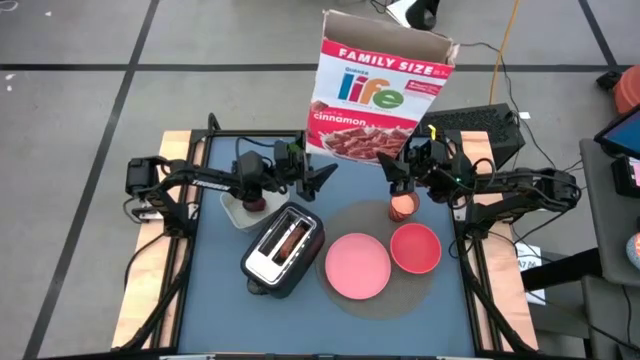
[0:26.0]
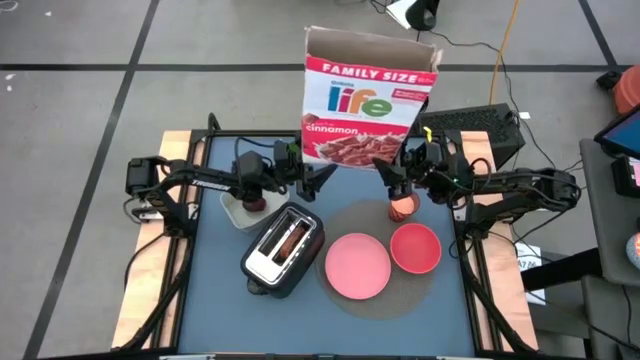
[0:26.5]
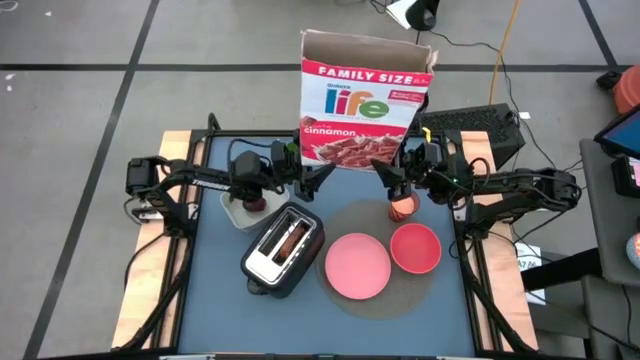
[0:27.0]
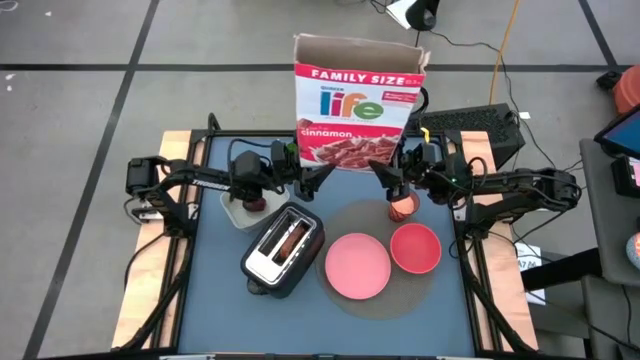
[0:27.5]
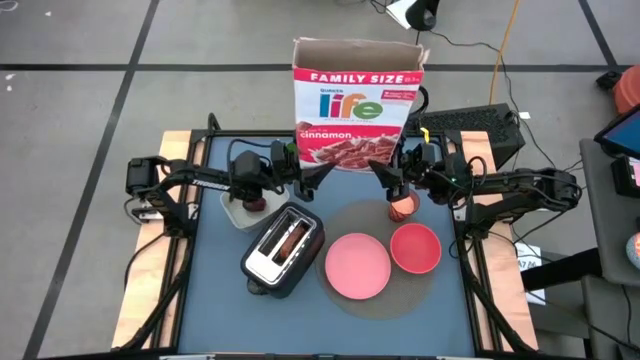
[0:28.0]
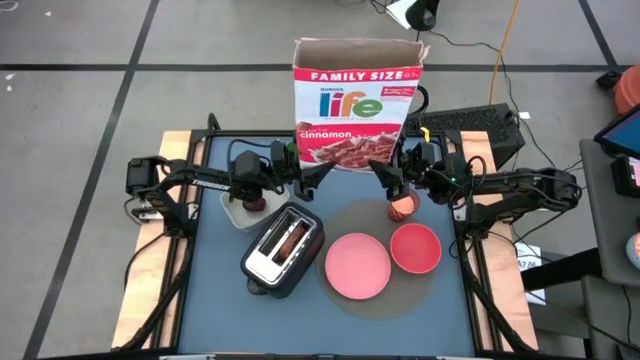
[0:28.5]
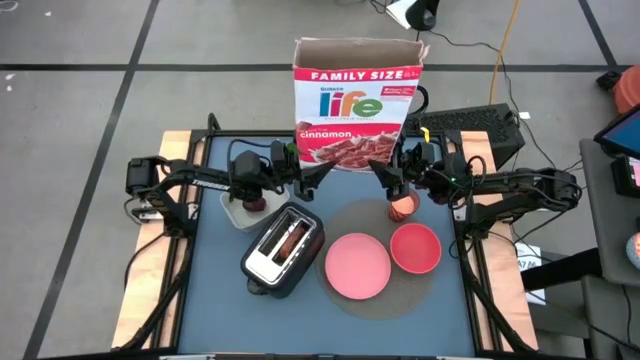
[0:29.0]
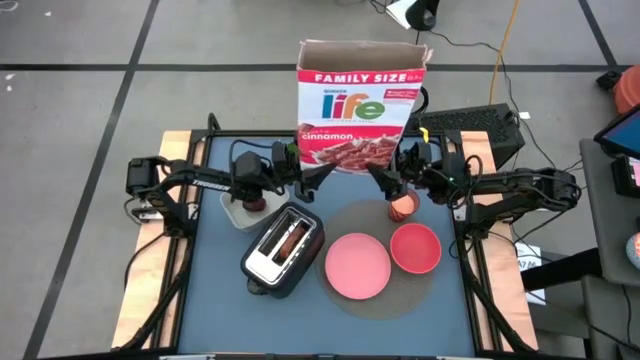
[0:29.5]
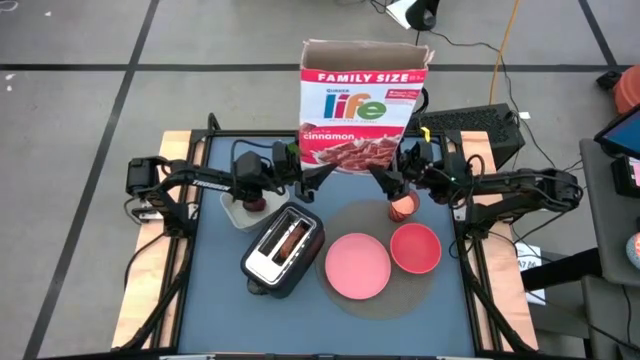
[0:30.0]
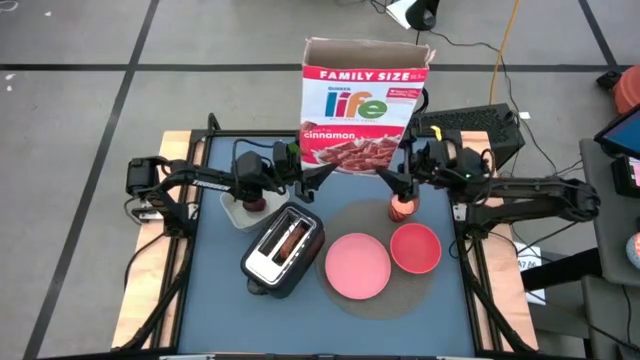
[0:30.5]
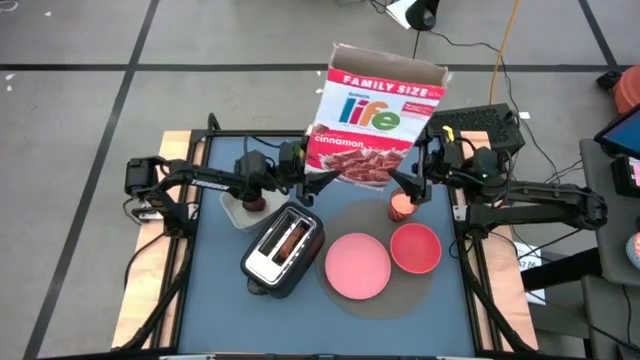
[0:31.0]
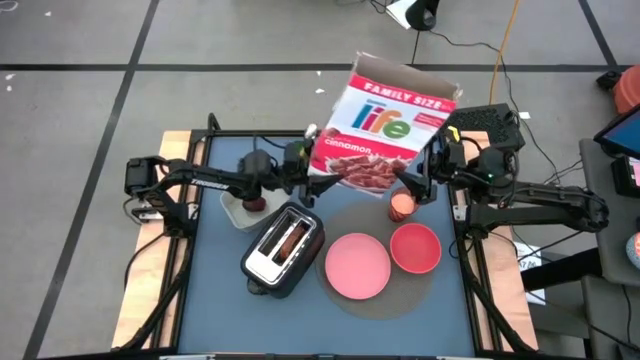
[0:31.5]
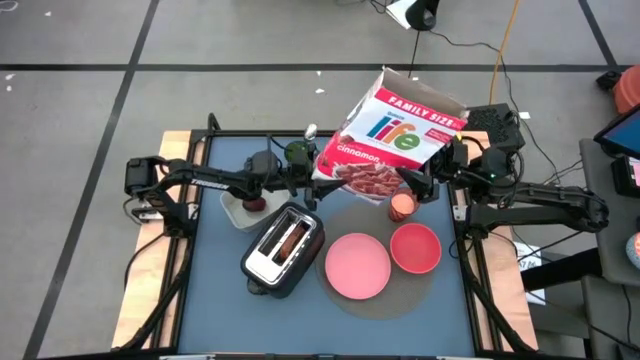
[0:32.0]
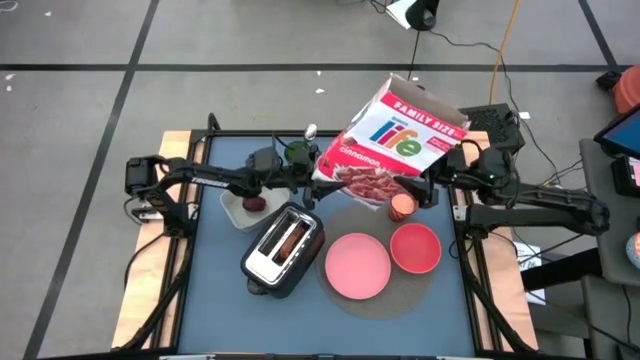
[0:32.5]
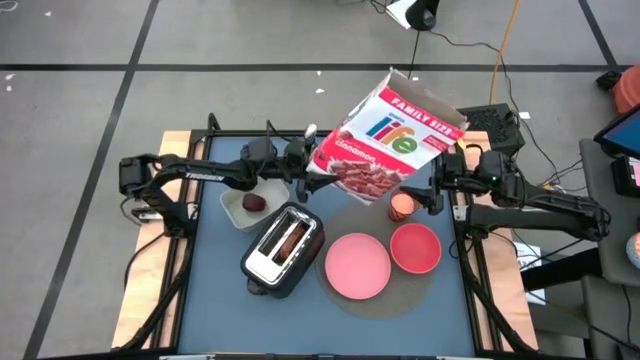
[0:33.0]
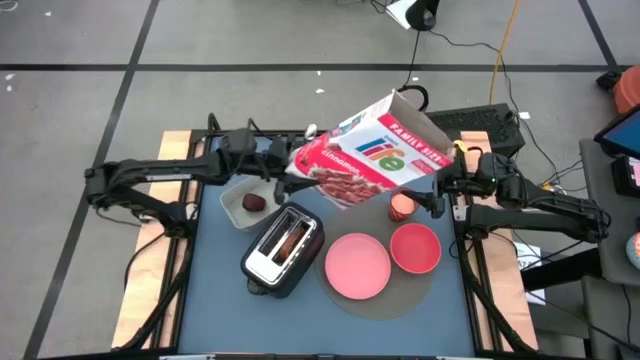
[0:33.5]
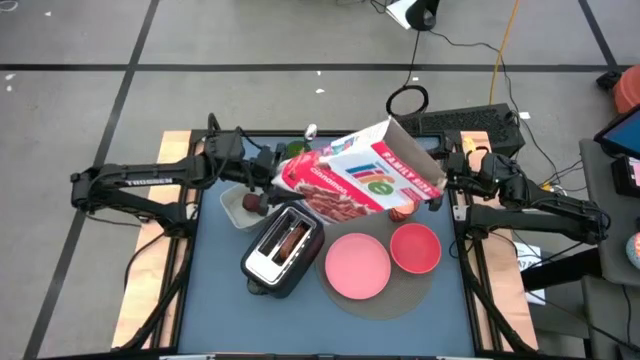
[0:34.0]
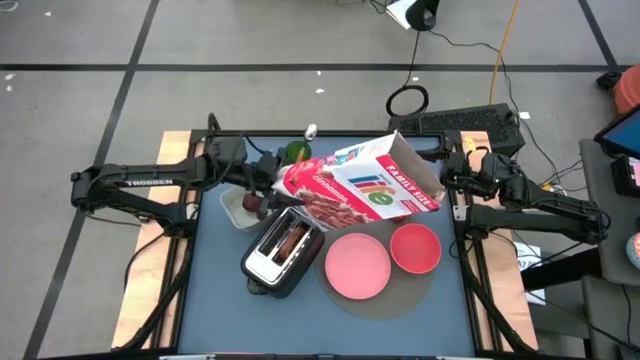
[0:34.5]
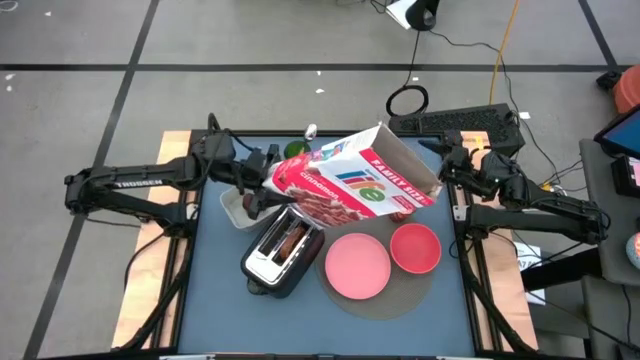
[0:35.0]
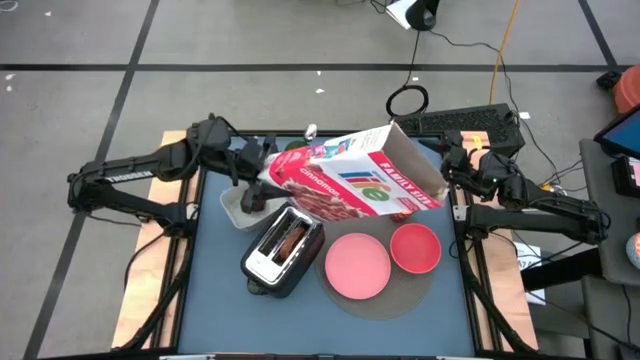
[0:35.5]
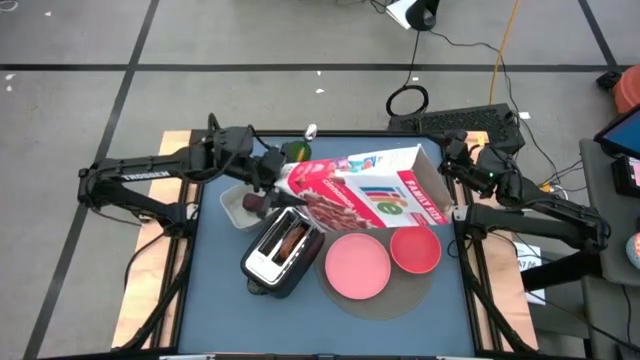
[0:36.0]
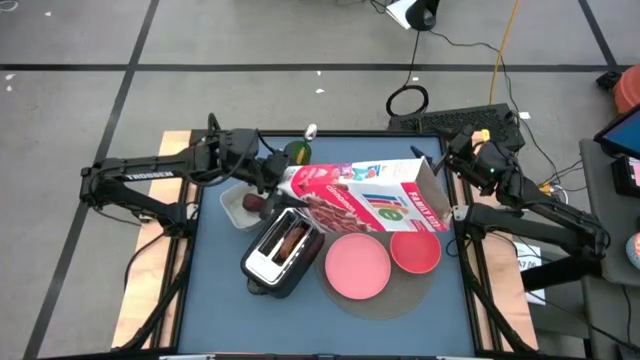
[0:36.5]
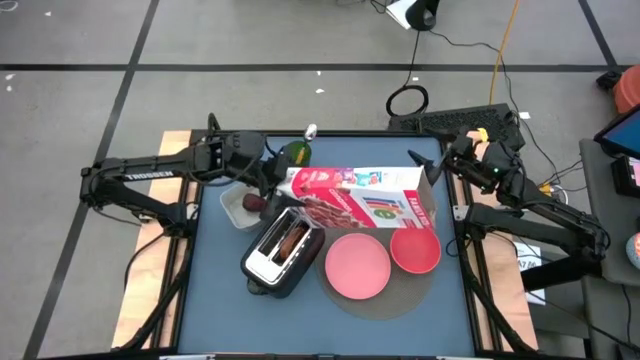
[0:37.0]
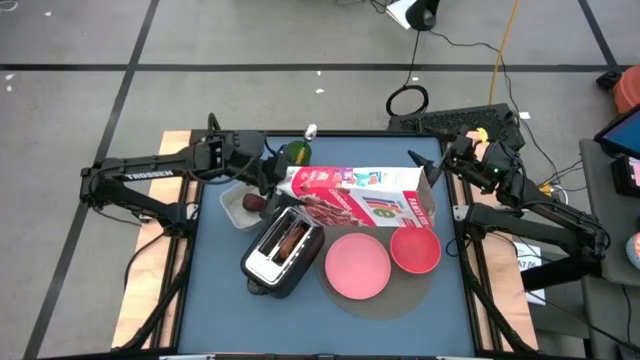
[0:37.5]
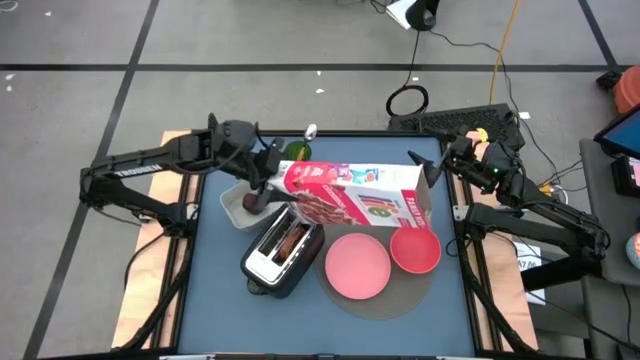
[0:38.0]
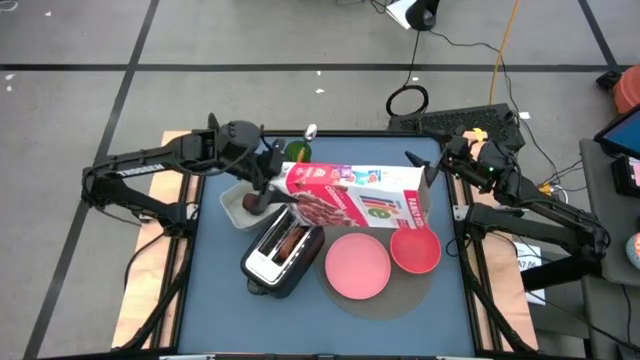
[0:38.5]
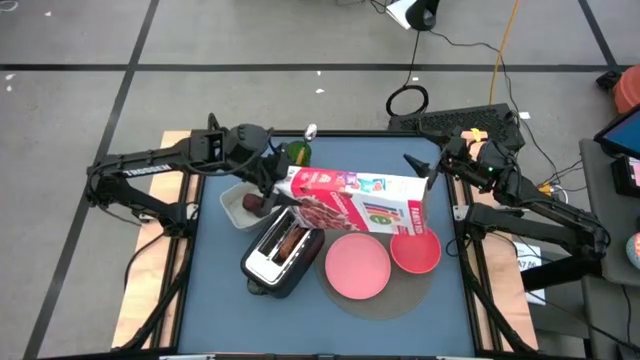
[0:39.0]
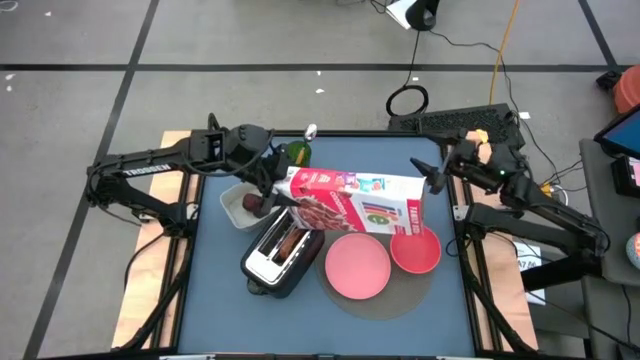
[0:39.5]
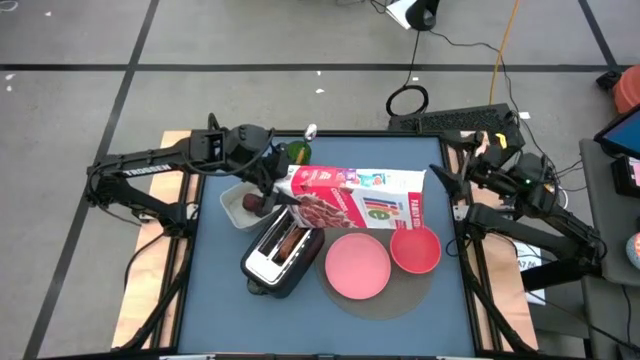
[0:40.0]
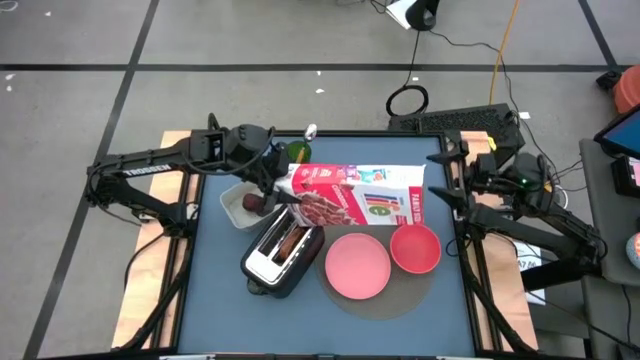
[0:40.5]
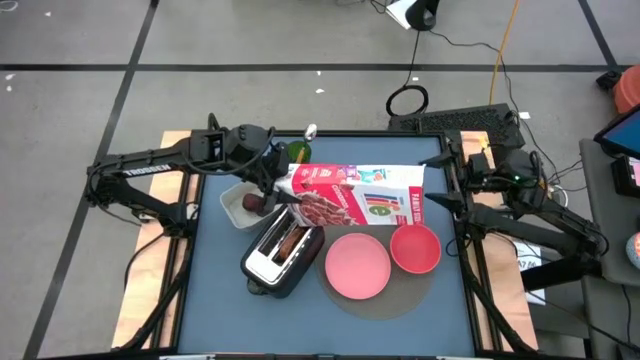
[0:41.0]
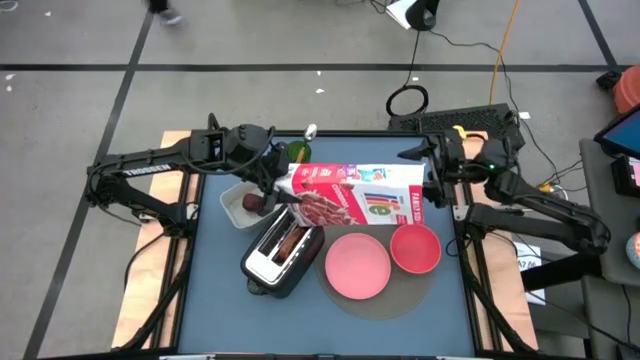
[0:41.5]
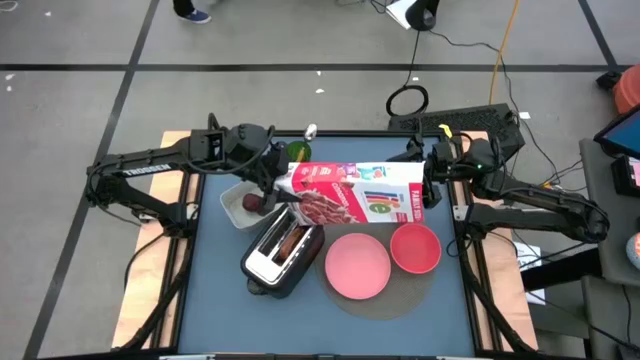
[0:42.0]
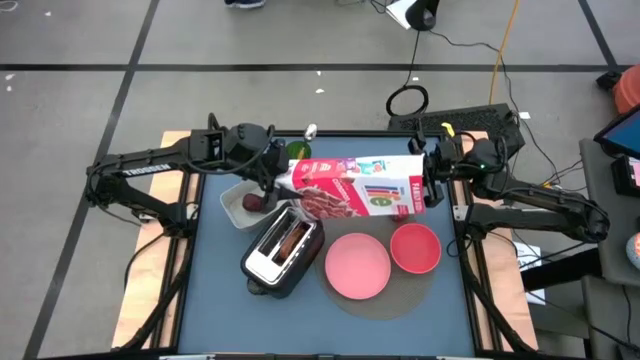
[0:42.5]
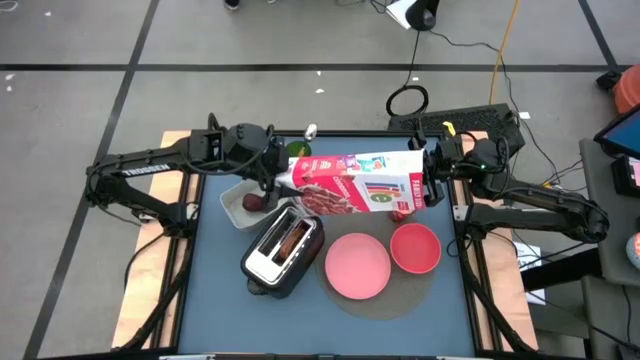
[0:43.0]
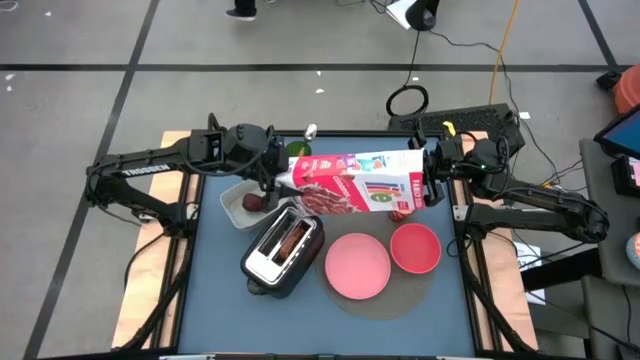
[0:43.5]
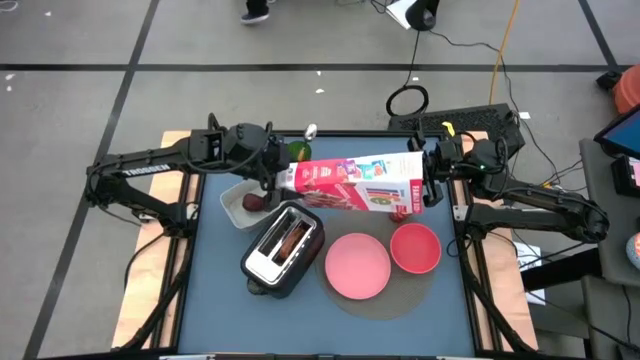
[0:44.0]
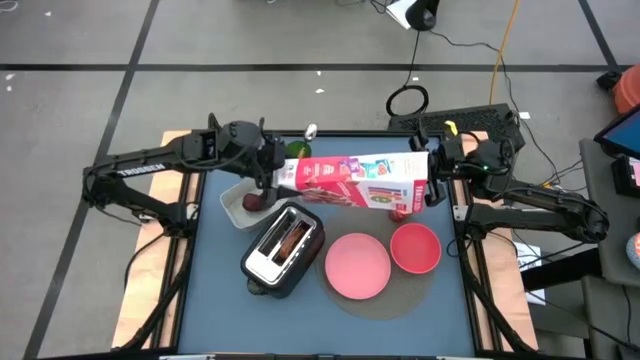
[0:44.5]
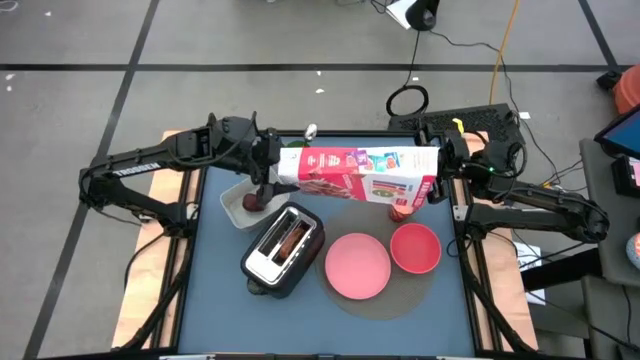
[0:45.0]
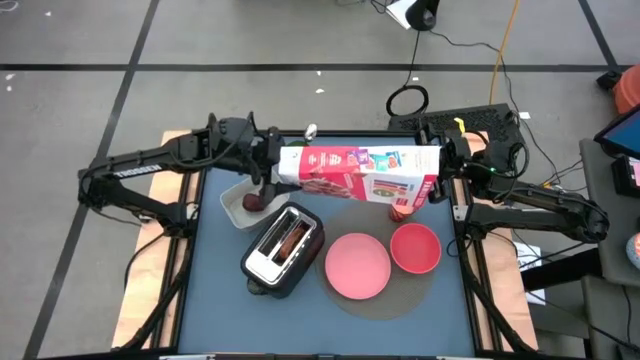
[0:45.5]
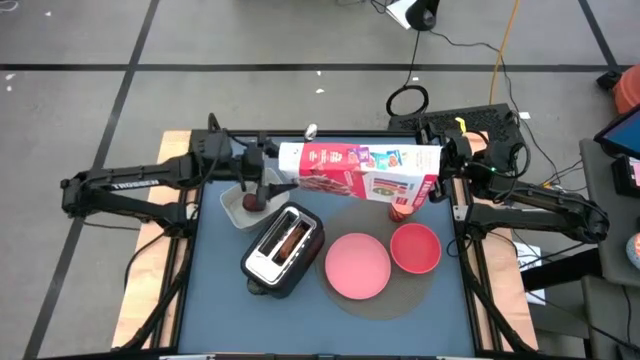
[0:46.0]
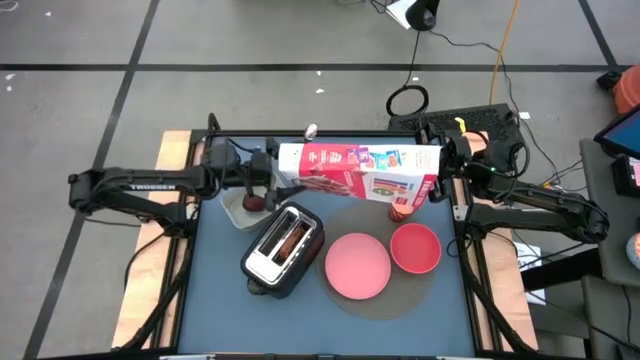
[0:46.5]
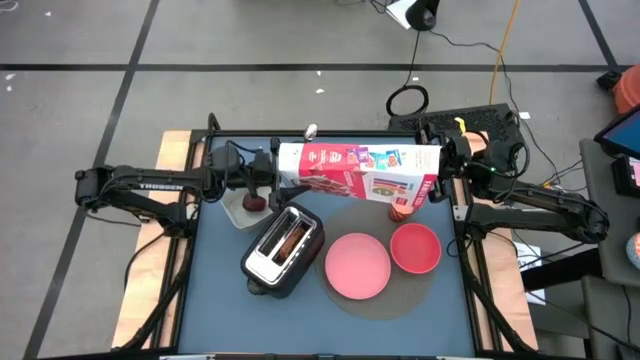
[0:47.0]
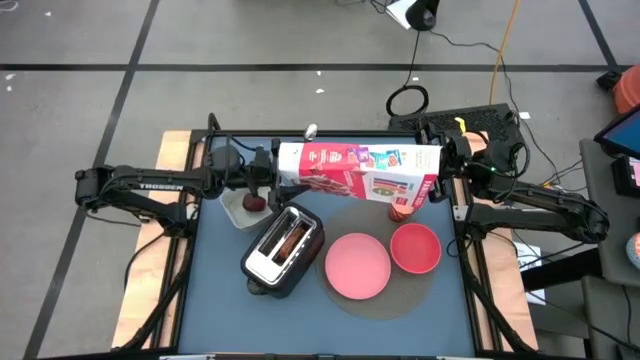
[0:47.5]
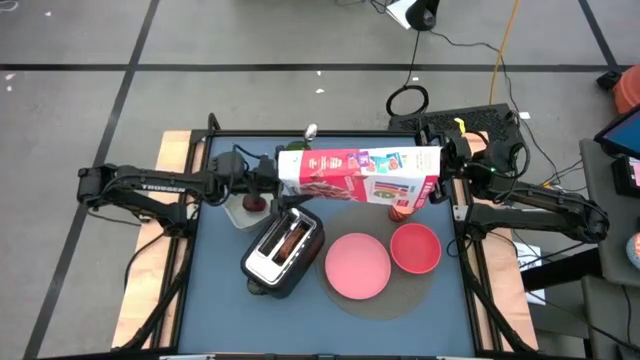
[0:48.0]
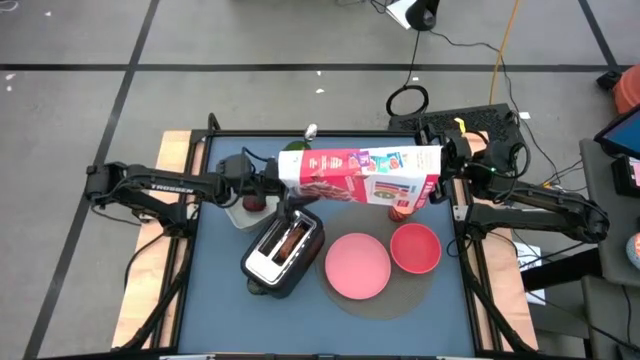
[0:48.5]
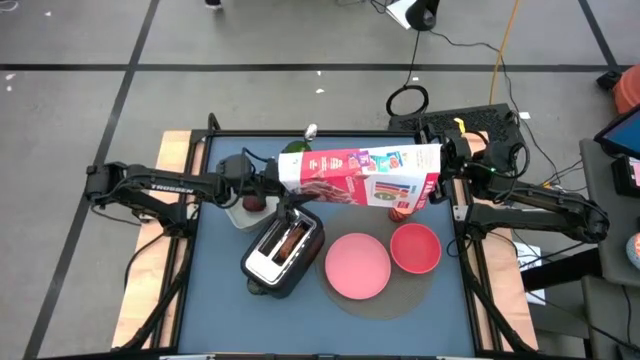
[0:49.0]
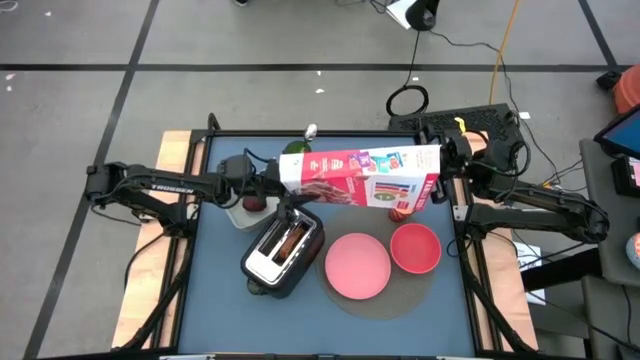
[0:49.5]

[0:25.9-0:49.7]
Task: Arrange a breakfast setting
Pour the cereal from the cereal box into the red bowl
